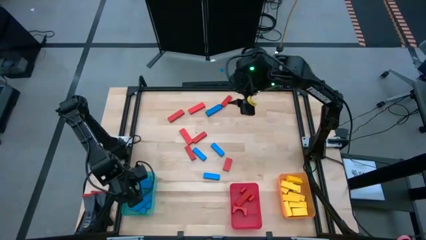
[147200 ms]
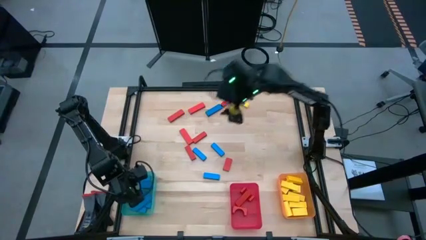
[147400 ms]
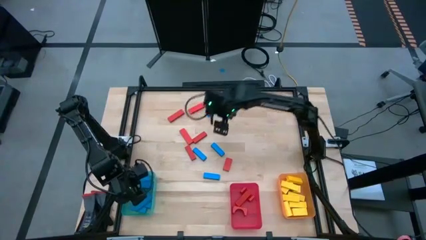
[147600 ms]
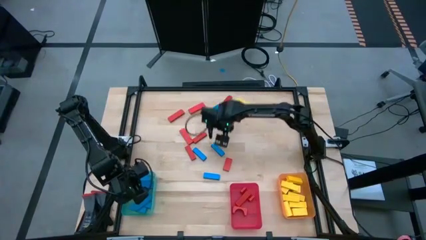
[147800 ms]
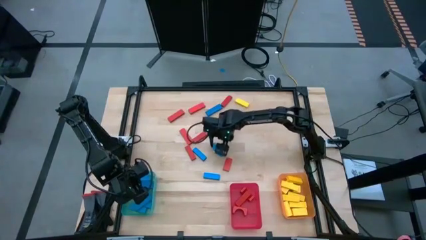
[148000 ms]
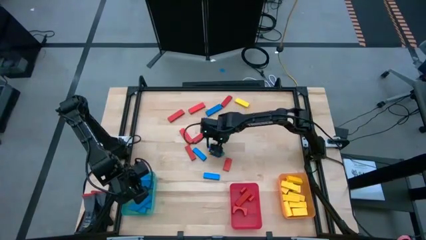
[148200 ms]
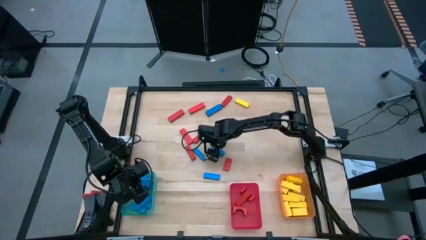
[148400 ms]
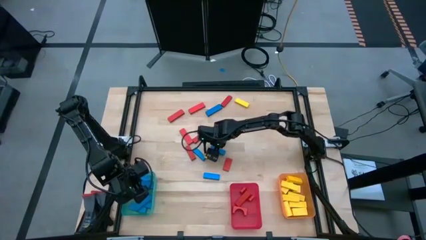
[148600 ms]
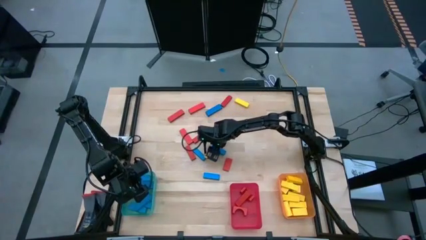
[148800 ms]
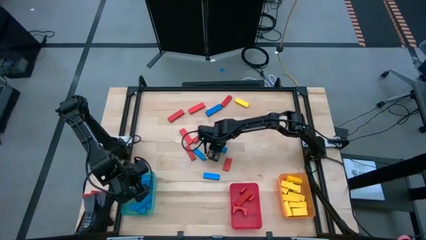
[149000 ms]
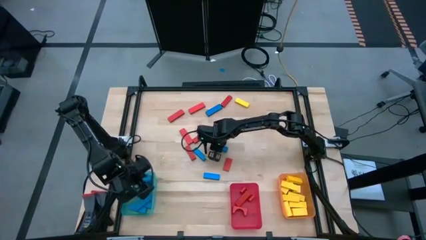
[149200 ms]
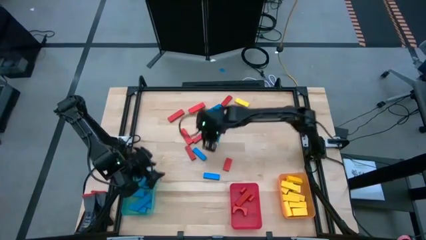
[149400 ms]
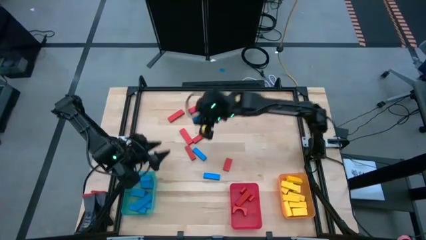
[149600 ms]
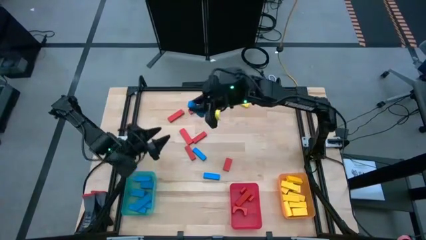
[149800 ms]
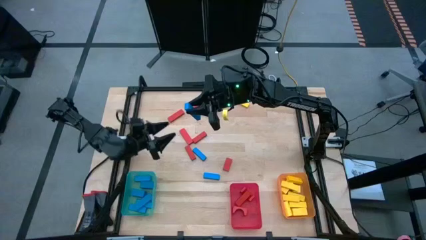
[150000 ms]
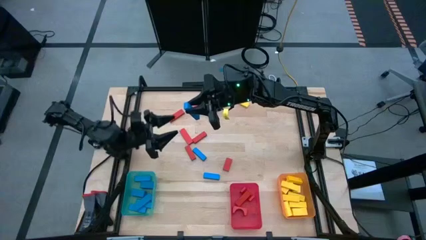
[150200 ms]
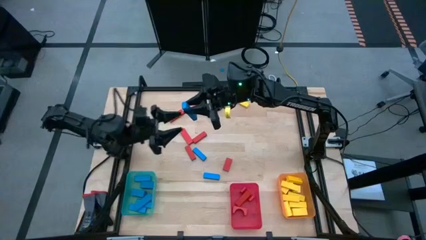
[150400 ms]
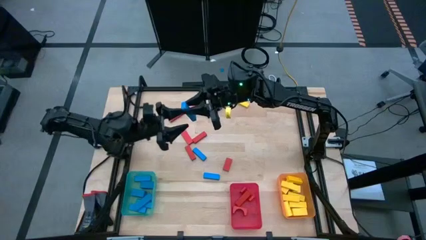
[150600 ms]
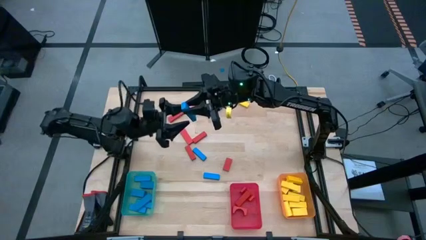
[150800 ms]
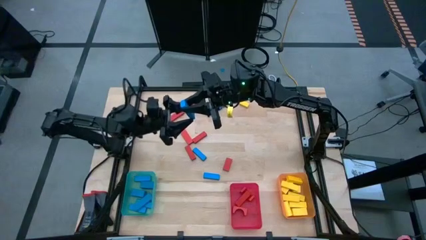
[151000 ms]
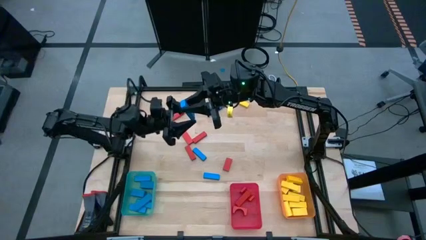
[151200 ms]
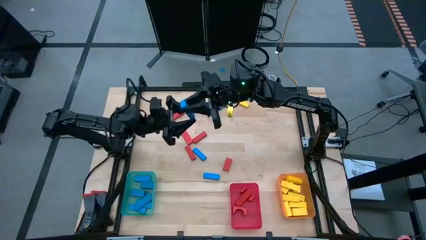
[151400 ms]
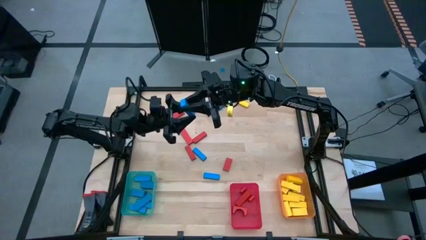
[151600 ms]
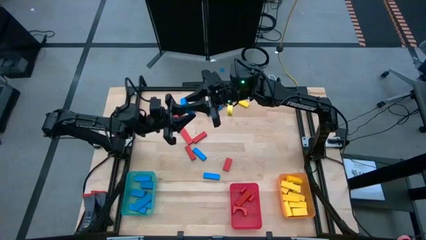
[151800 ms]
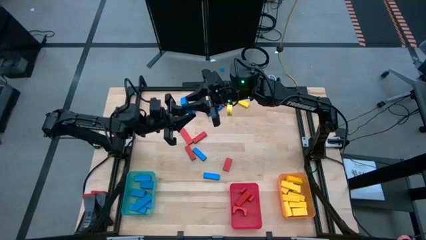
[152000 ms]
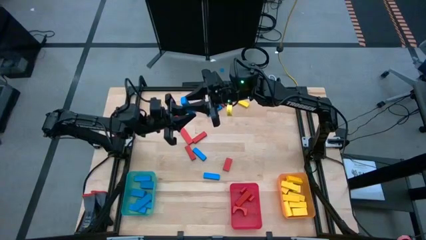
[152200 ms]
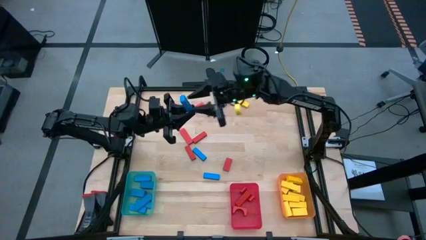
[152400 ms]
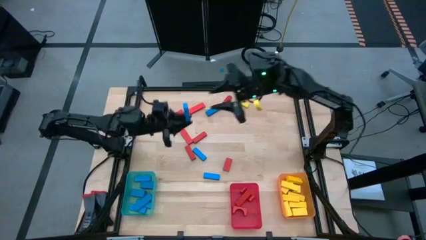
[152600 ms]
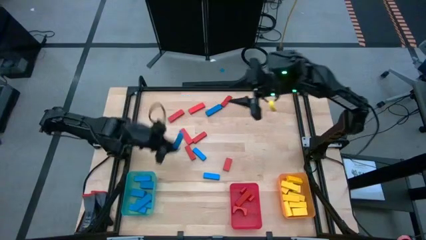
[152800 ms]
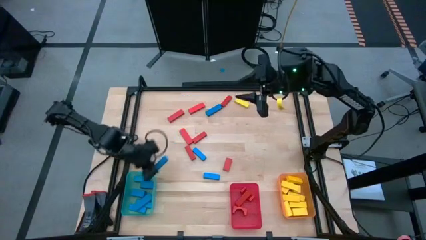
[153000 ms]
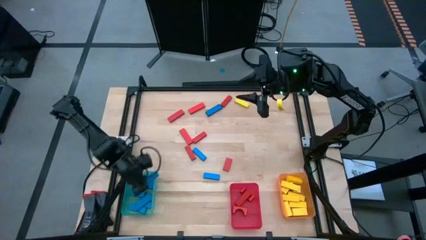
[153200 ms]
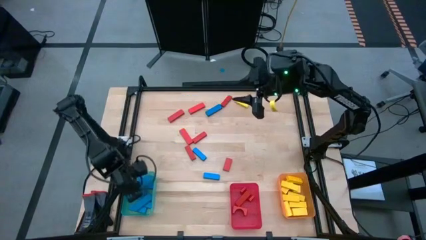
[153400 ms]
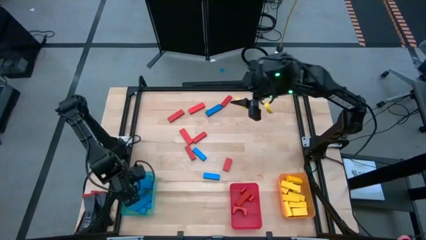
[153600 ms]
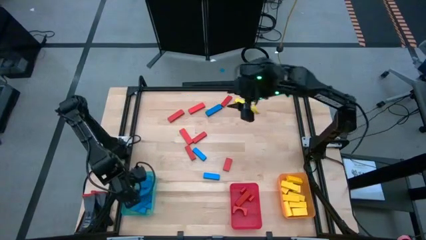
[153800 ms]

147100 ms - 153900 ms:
Task: Sort blocks
Put the blue block into the blue bin

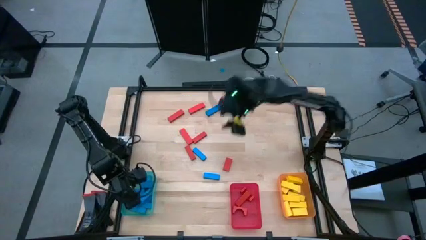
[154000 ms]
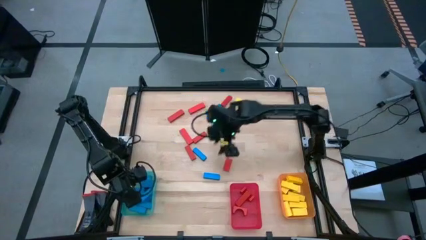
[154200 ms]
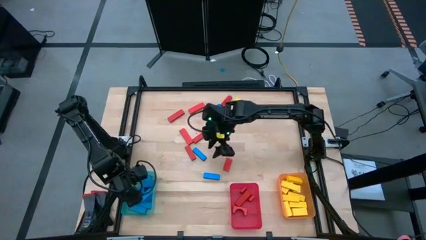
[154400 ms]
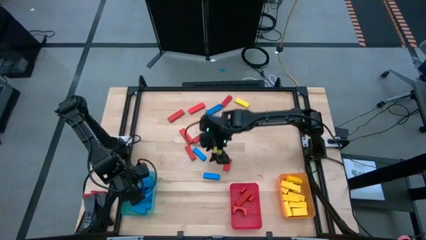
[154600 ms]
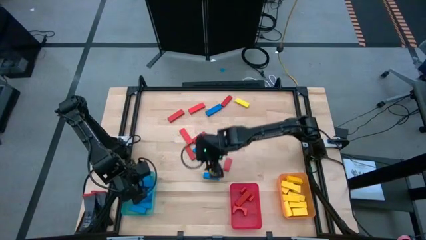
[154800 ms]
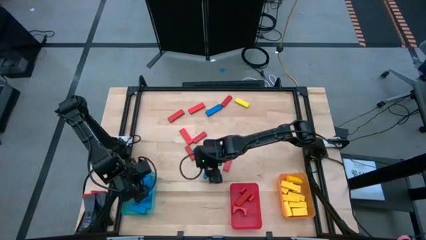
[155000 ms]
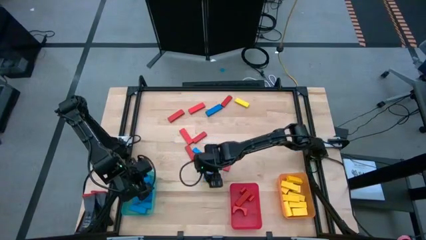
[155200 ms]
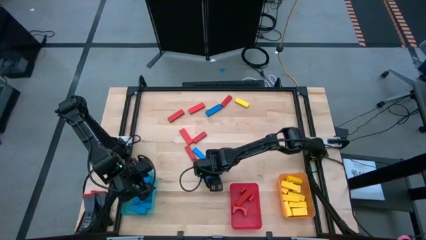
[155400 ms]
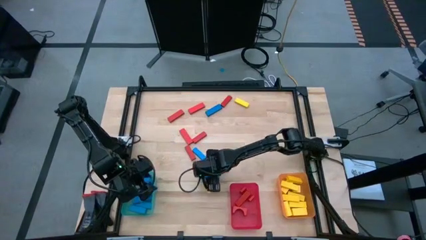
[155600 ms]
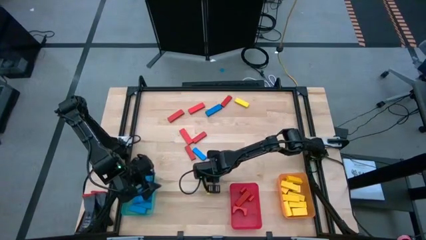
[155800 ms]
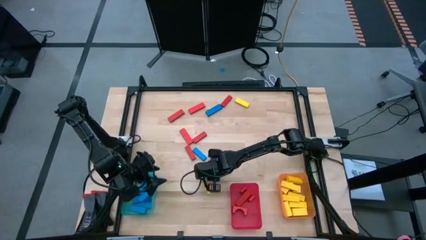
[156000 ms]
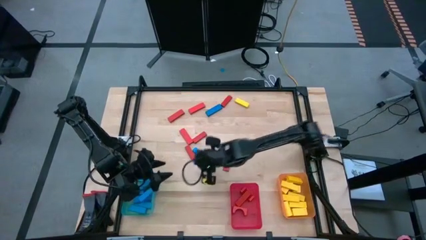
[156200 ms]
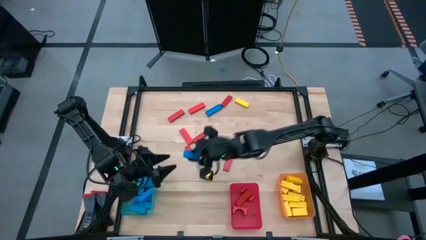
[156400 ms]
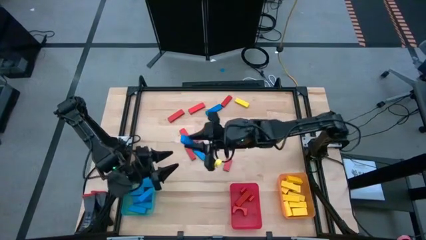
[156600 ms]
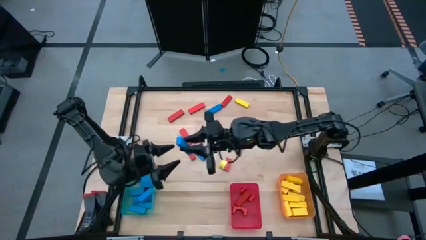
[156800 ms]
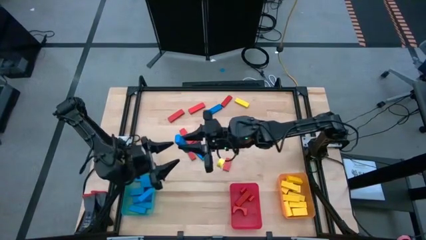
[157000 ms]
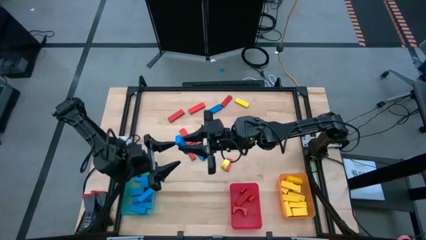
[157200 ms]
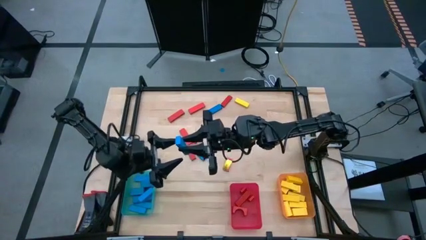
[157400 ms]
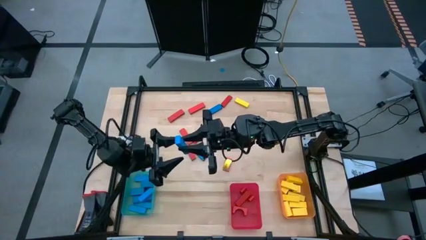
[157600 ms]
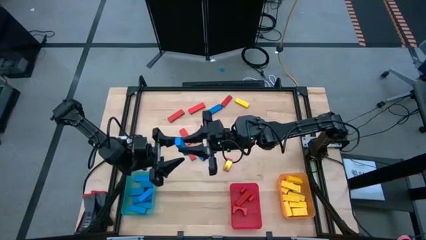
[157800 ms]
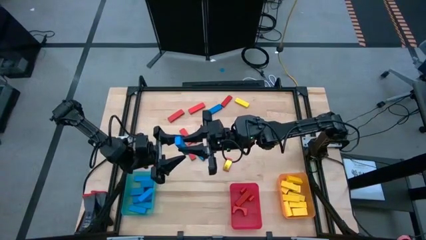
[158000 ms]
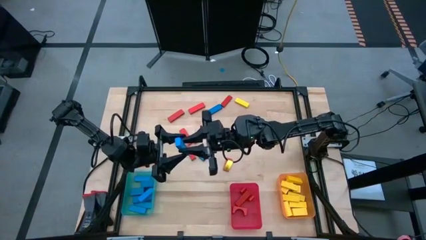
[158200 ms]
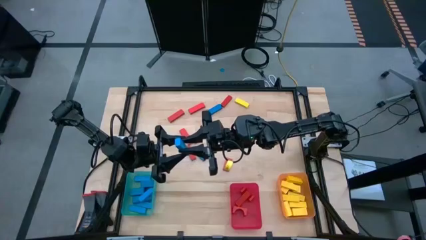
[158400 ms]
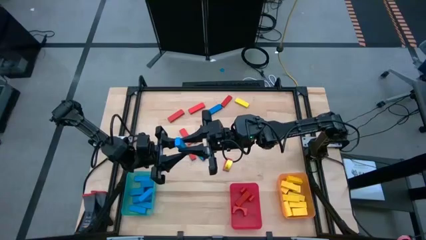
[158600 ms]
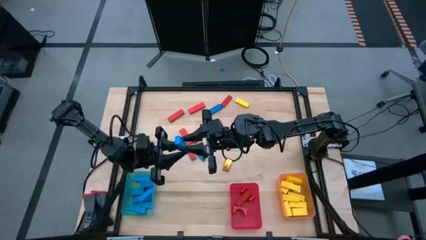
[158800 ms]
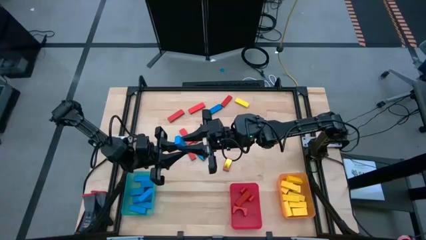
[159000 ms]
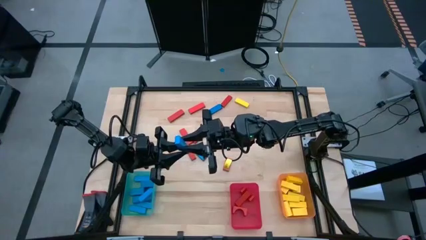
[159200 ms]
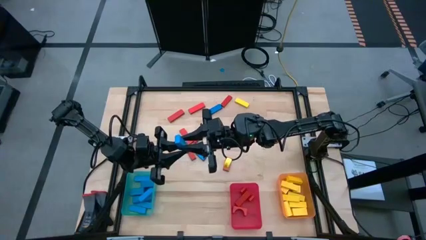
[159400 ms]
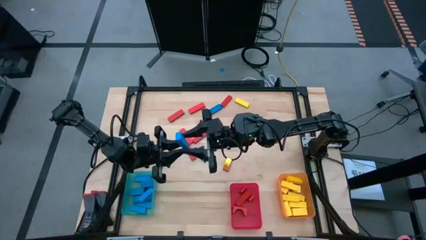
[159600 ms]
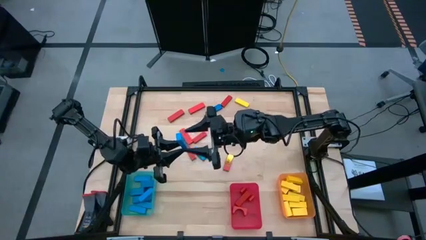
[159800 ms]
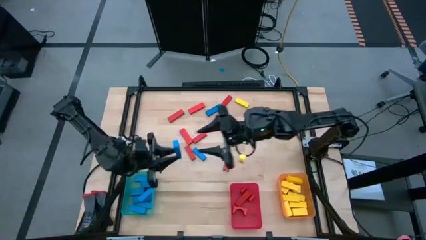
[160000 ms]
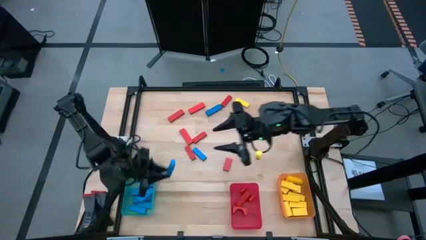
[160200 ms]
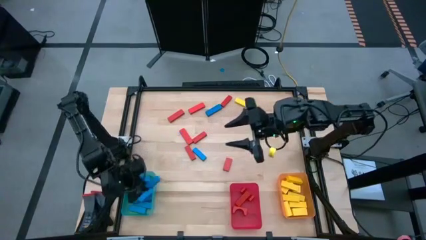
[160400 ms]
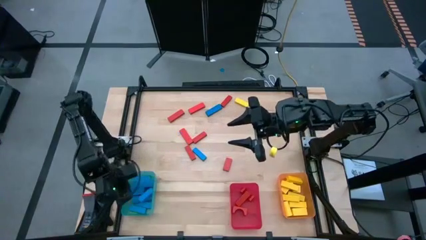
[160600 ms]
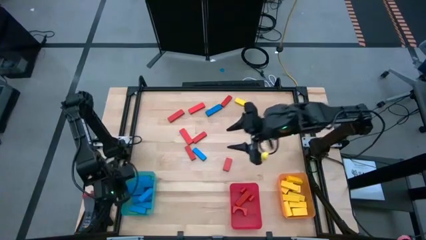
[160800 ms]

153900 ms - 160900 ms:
Put the blue block into the blue bin
